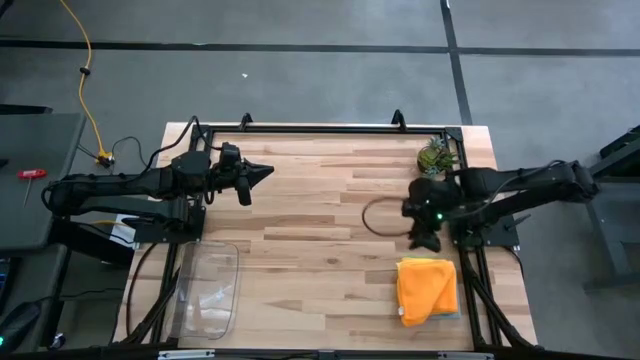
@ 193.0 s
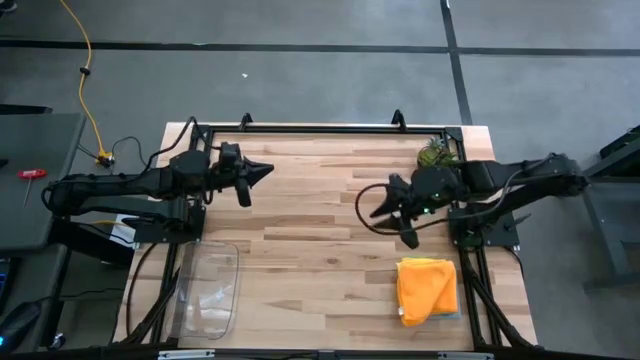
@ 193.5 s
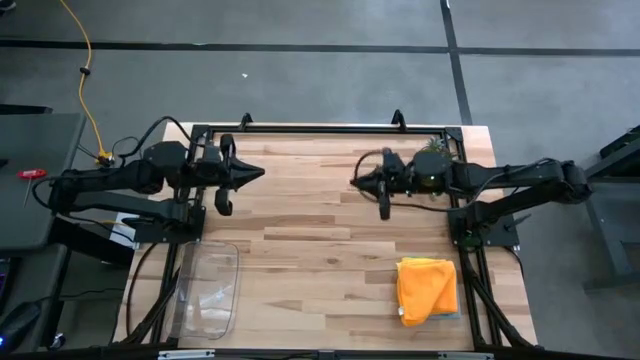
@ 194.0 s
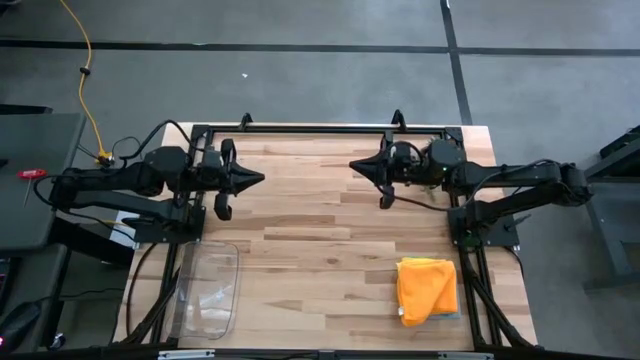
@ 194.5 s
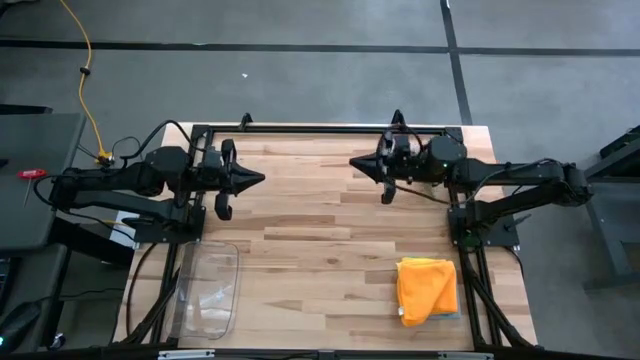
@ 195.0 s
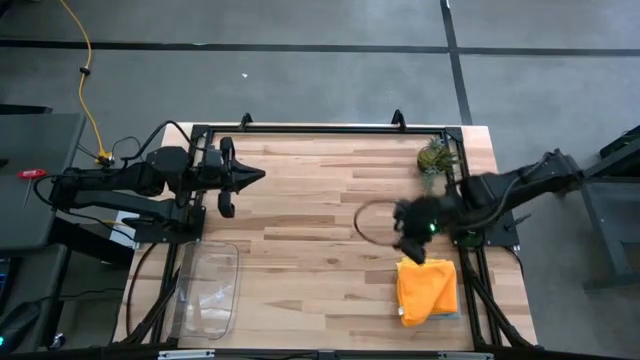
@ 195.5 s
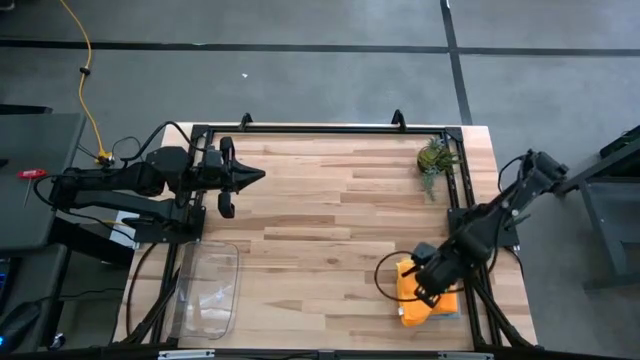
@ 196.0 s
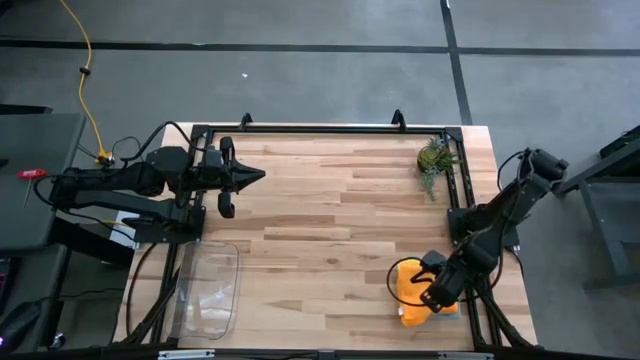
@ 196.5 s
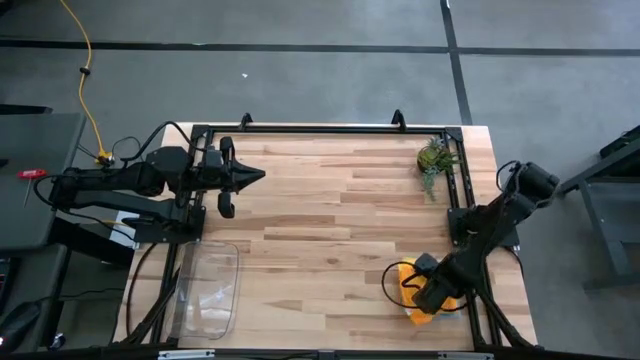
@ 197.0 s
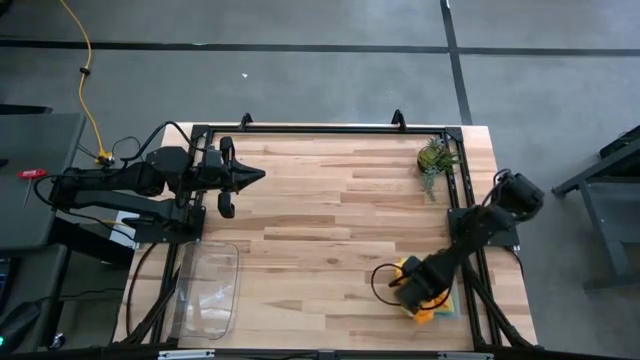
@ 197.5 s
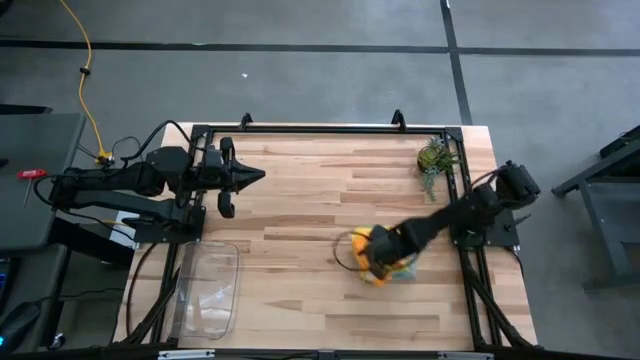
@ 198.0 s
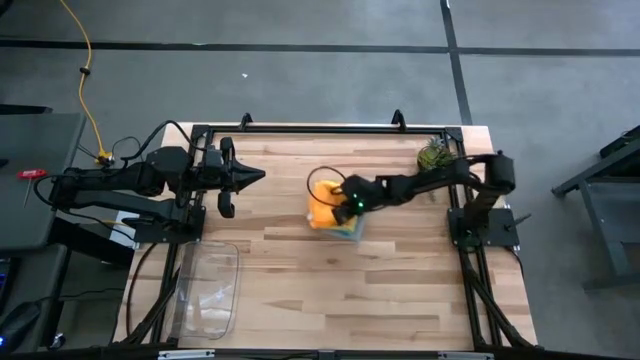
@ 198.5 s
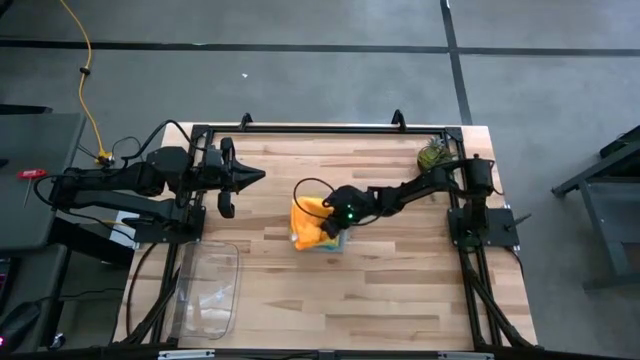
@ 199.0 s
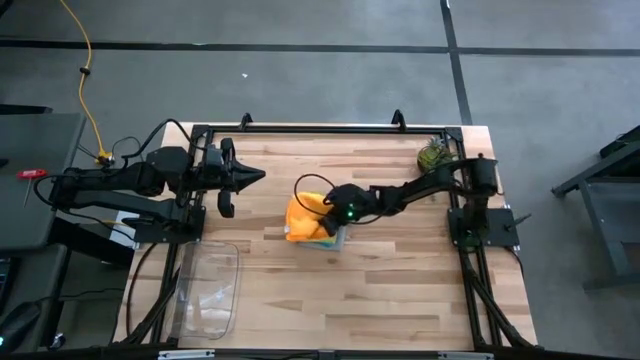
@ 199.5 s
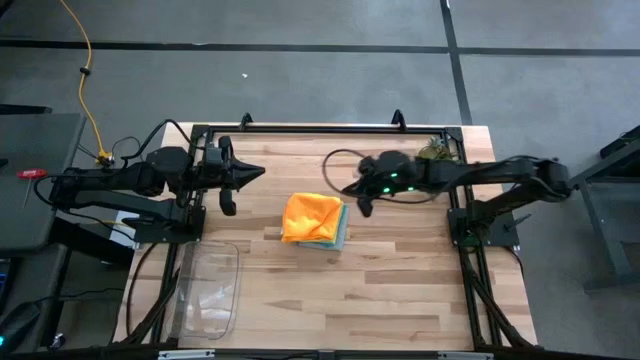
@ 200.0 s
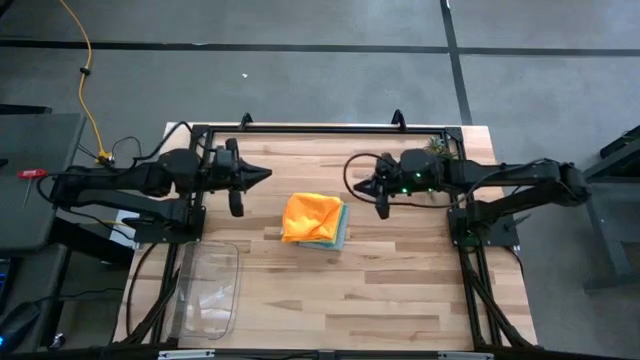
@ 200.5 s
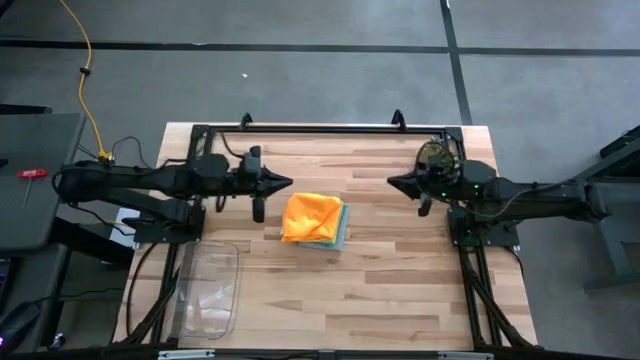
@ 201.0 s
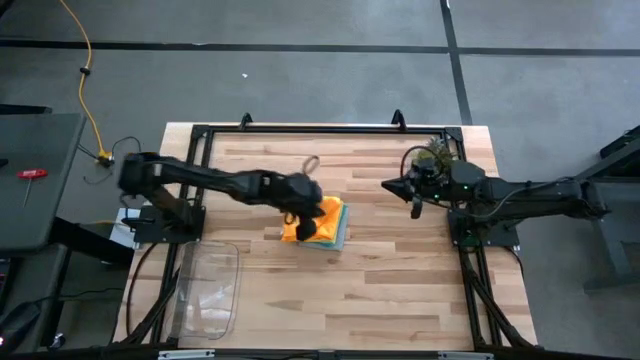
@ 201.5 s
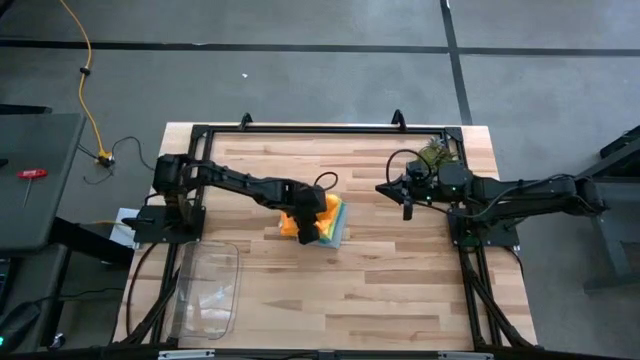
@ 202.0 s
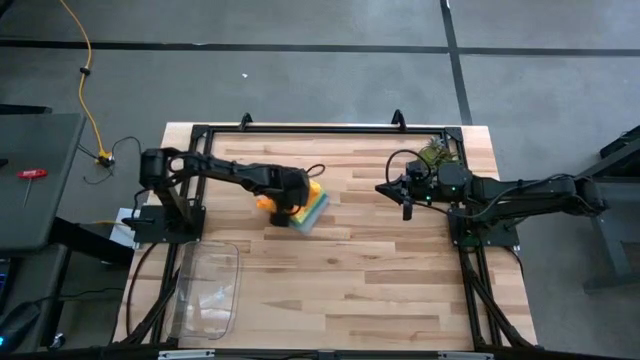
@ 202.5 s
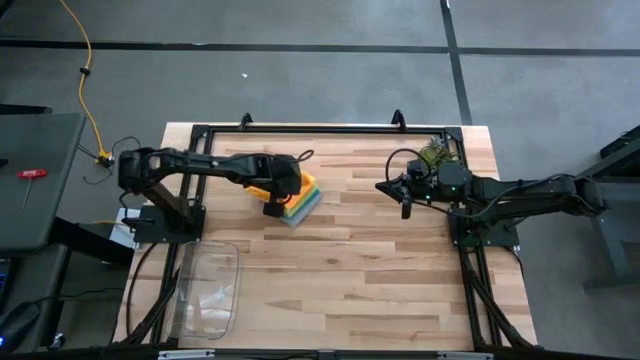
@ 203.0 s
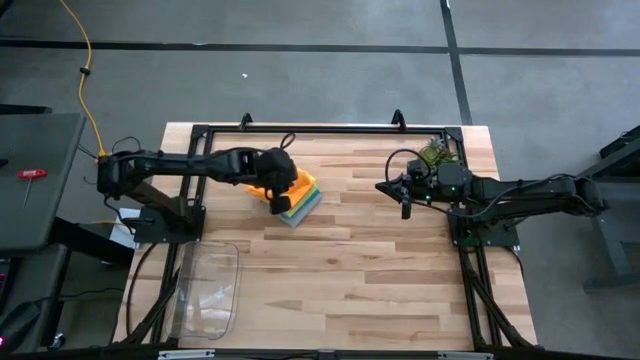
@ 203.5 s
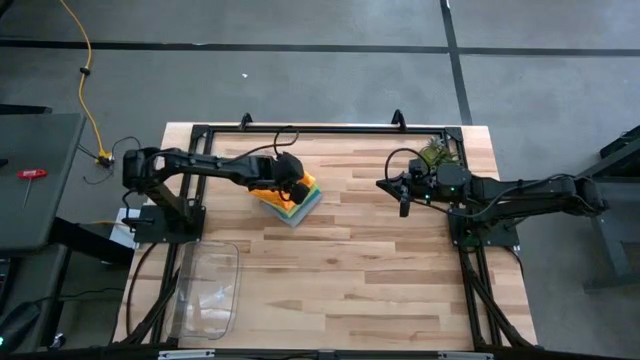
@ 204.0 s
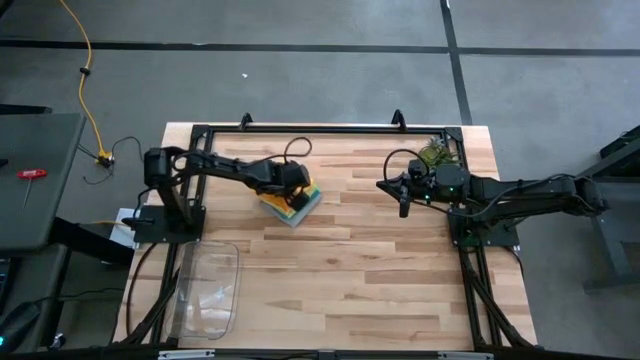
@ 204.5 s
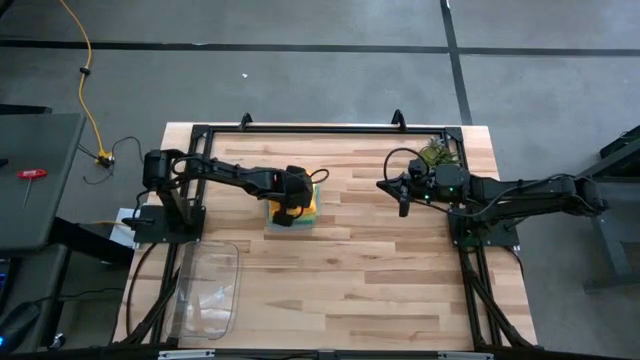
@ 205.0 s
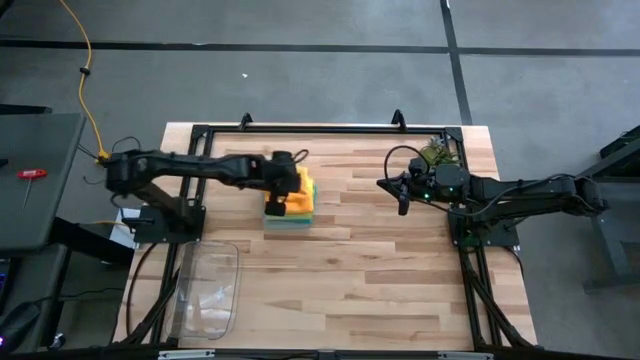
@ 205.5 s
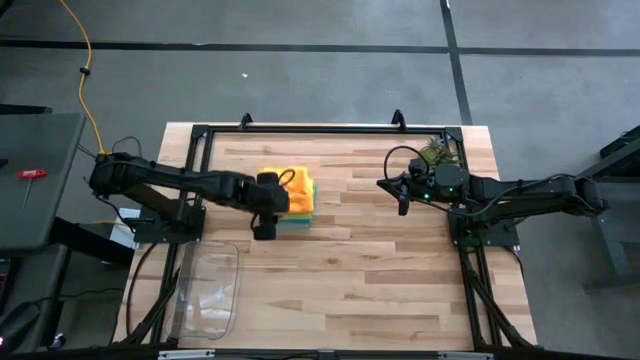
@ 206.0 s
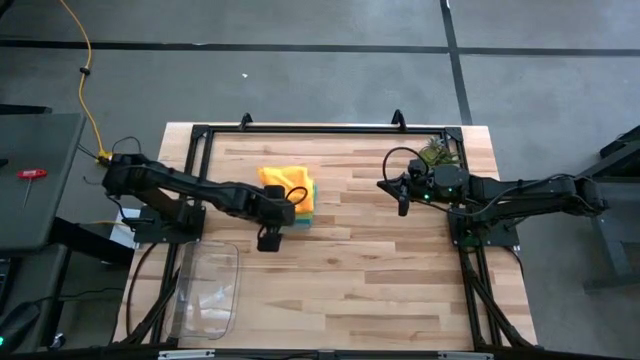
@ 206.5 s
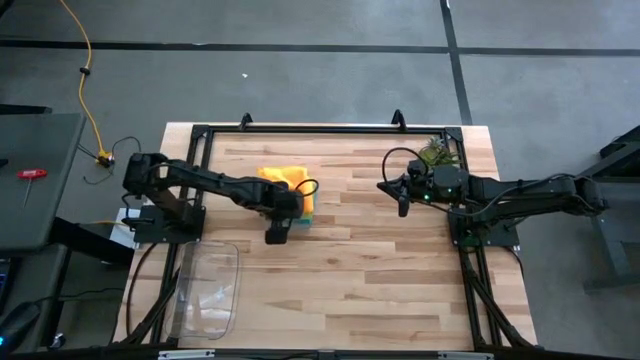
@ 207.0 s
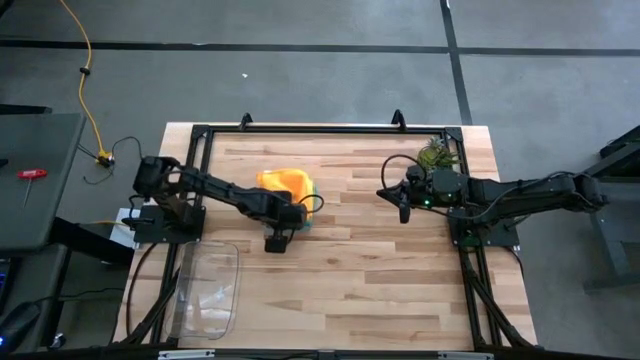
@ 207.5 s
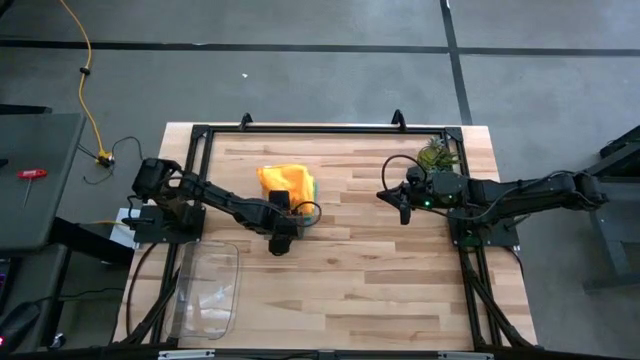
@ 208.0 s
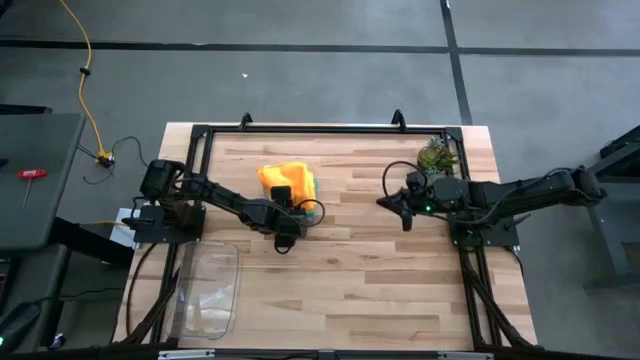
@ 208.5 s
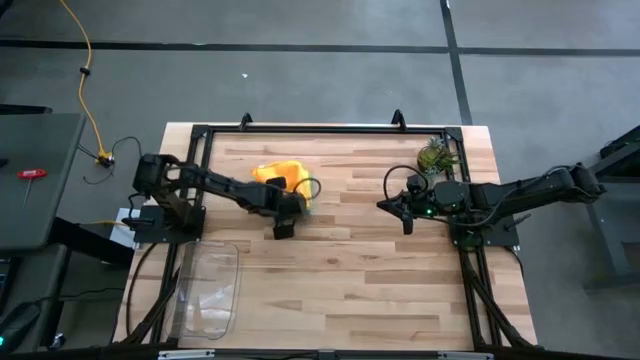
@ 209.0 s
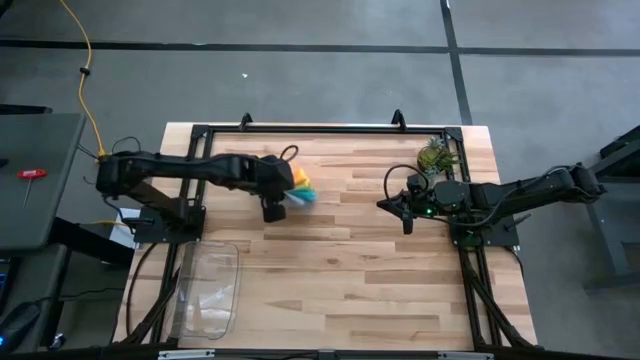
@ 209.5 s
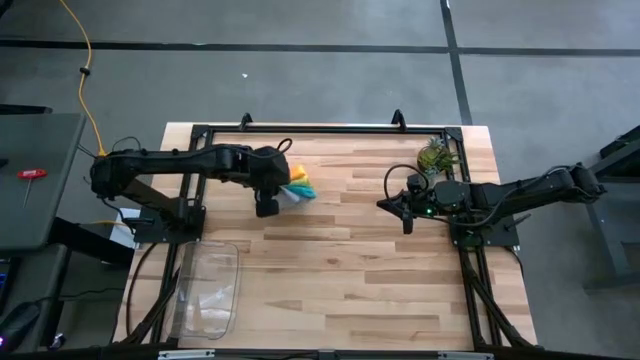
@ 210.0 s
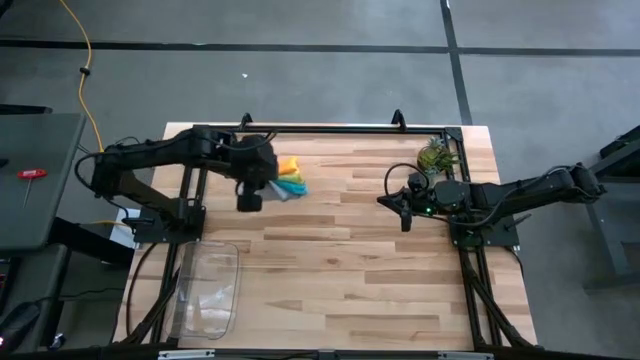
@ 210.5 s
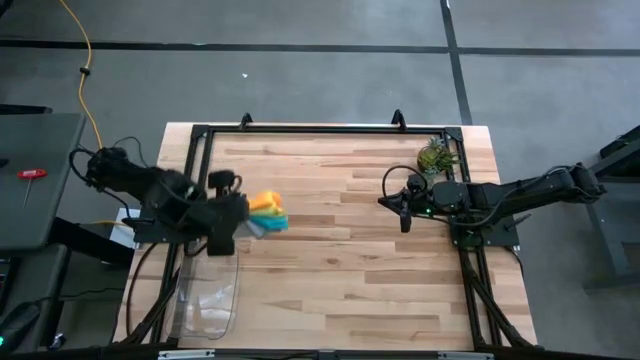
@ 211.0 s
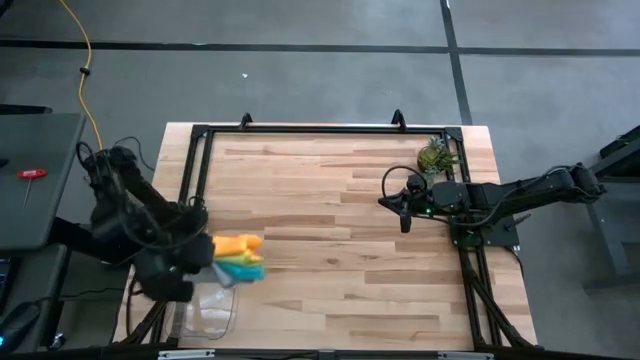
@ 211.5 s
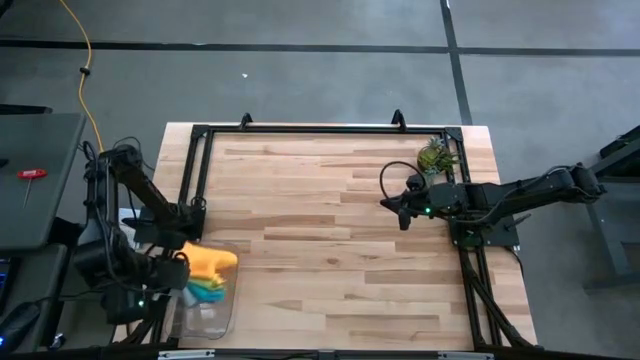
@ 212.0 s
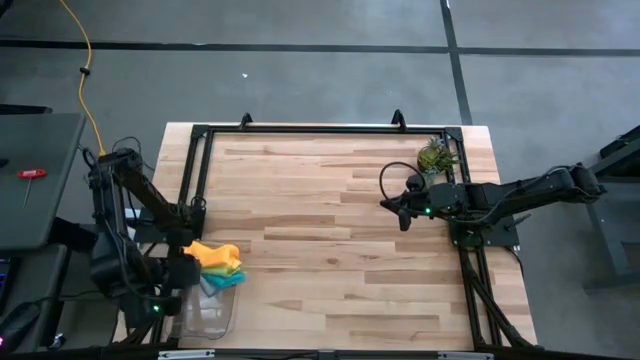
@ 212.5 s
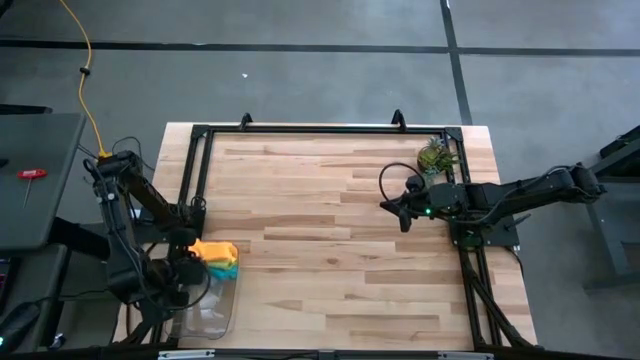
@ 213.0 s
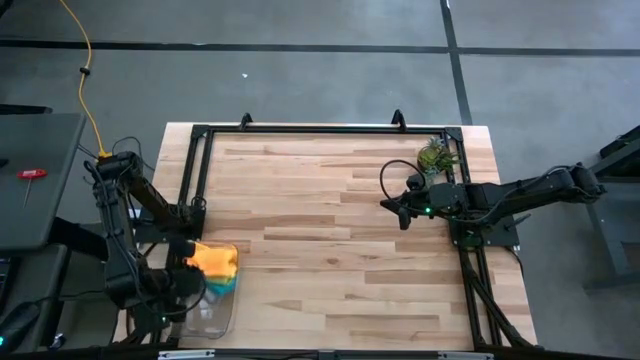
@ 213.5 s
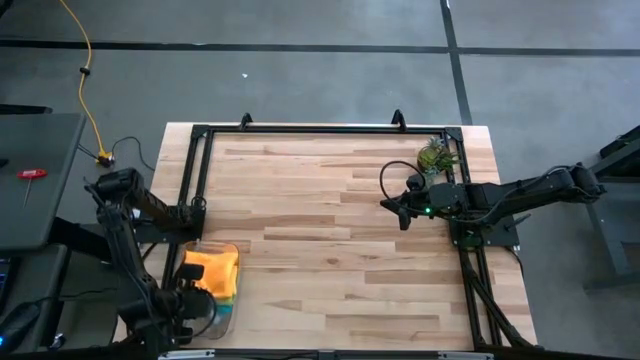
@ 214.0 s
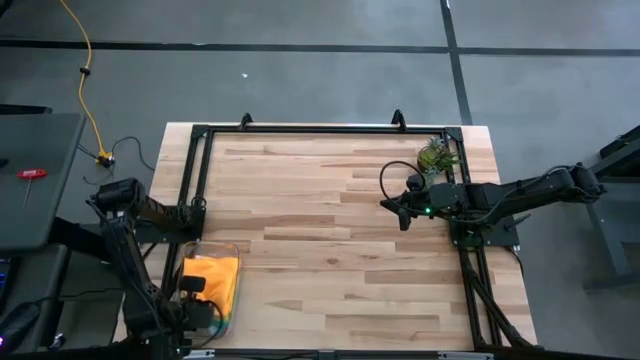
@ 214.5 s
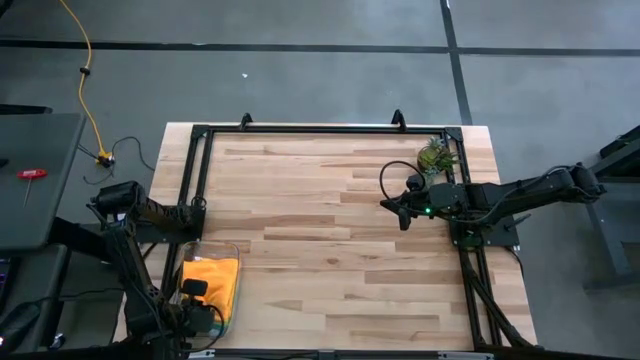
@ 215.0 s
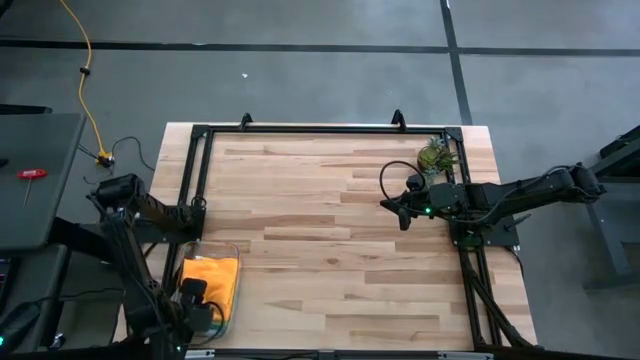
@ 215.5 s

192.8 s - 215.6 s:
Task: Fold microfiber towels
Put the stacked microfiber cloths into the transparent bin
